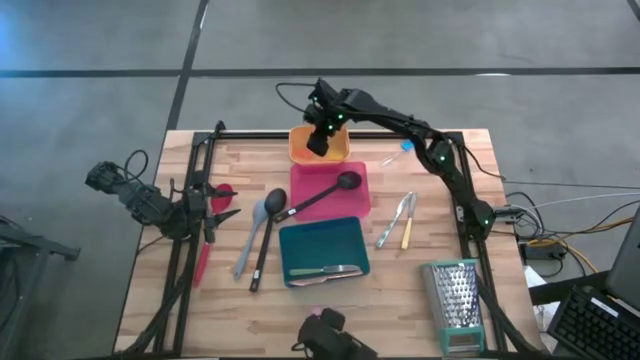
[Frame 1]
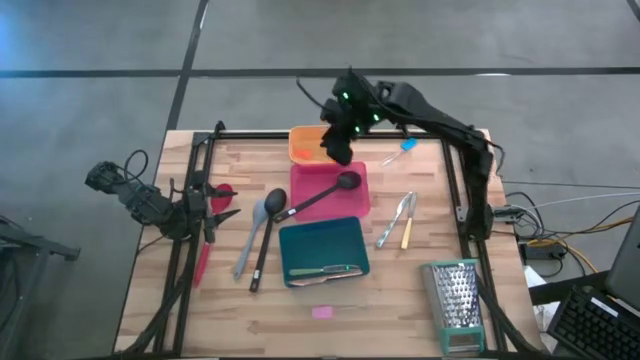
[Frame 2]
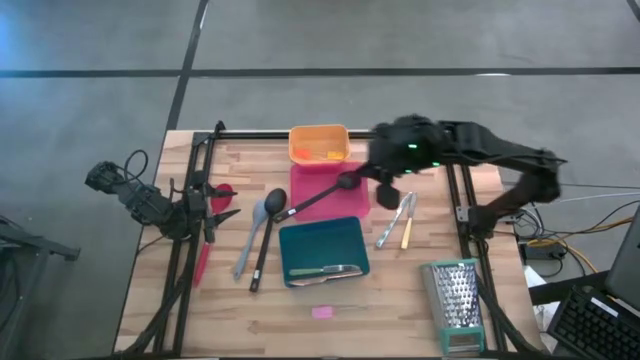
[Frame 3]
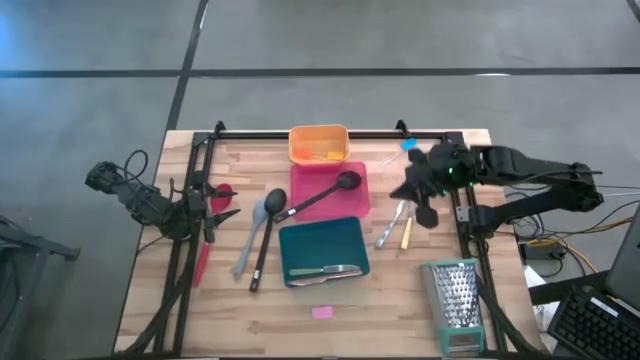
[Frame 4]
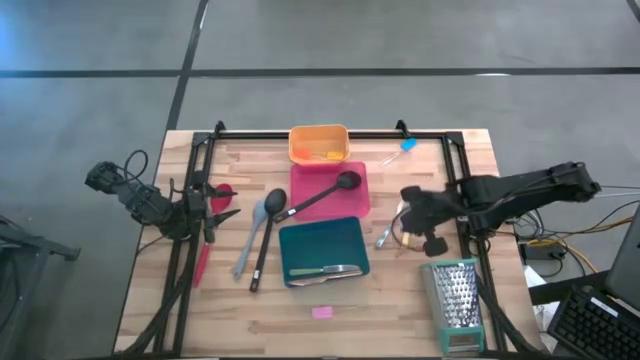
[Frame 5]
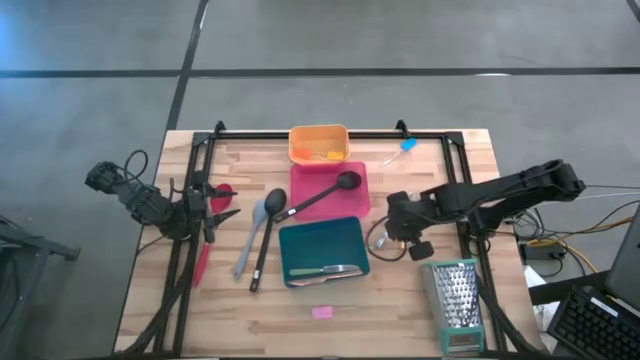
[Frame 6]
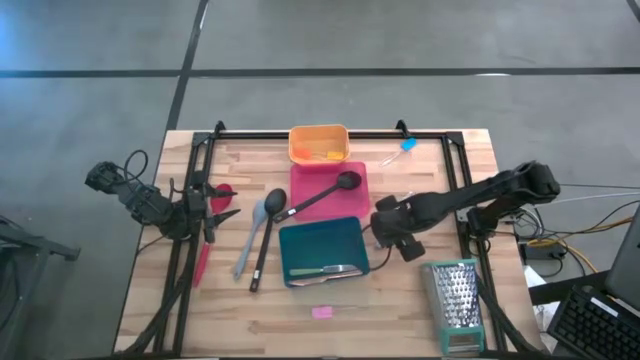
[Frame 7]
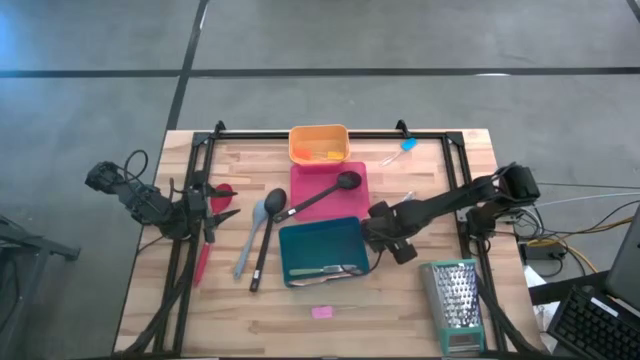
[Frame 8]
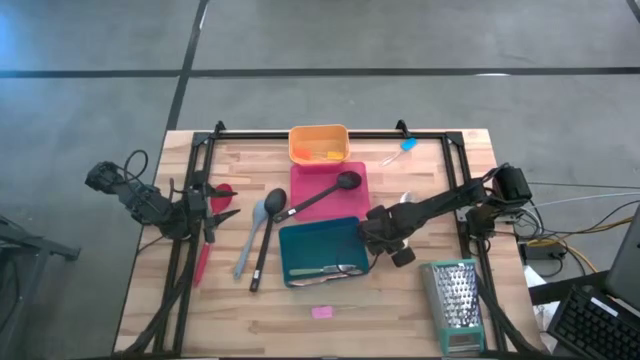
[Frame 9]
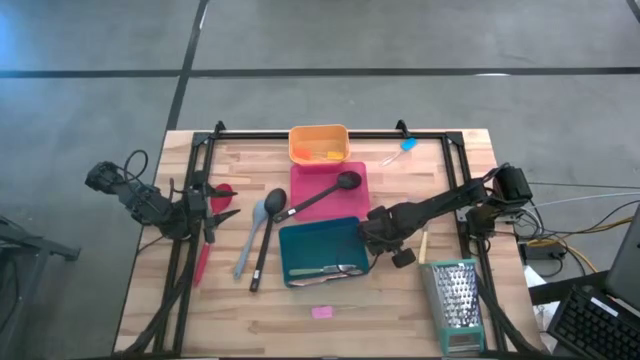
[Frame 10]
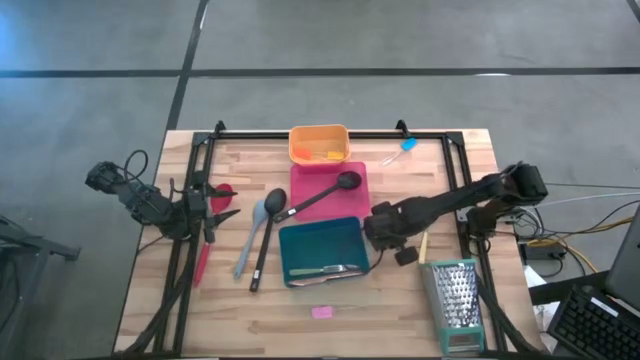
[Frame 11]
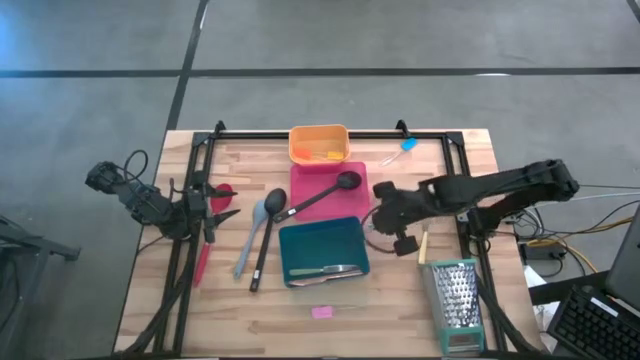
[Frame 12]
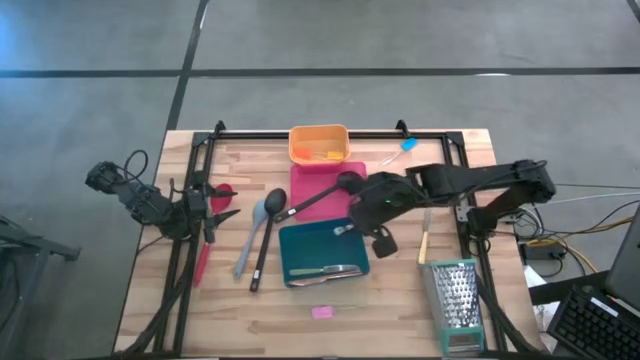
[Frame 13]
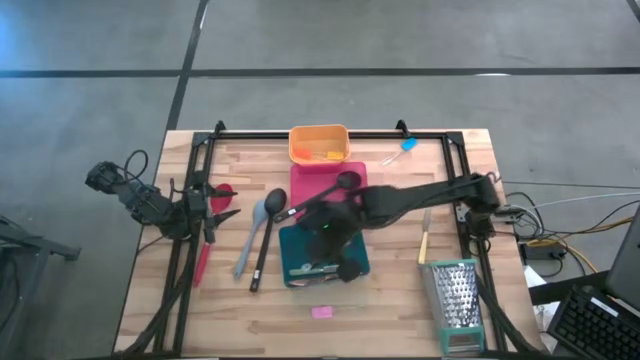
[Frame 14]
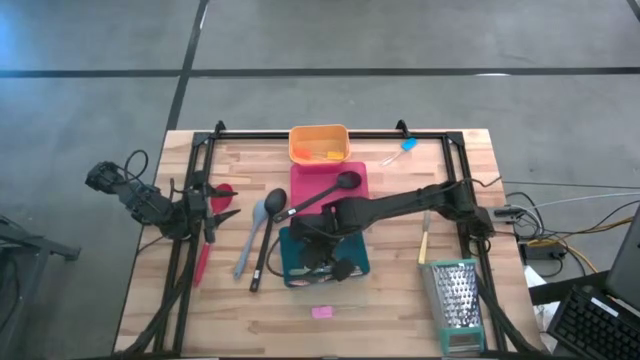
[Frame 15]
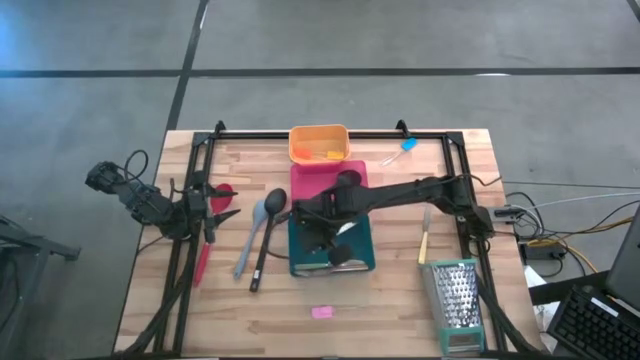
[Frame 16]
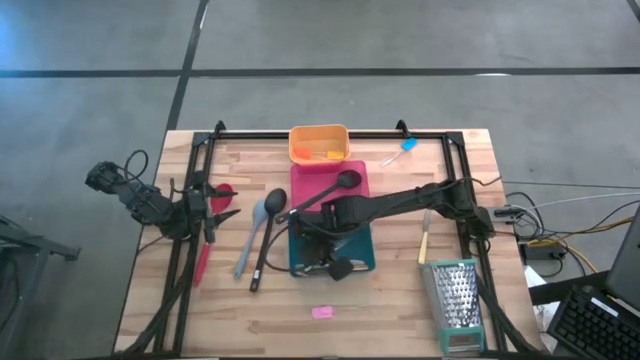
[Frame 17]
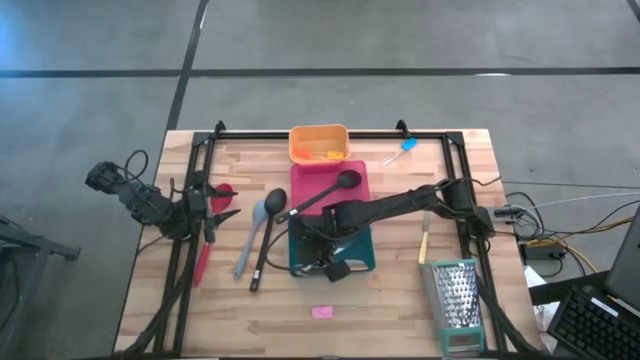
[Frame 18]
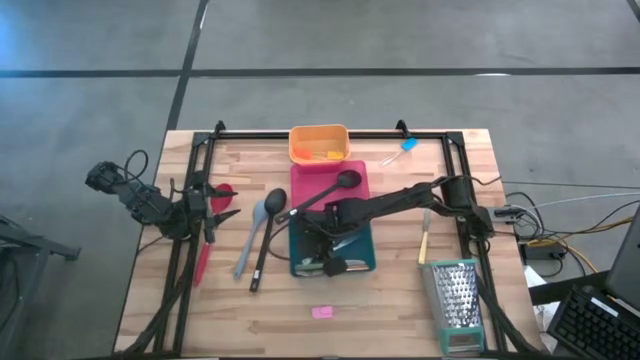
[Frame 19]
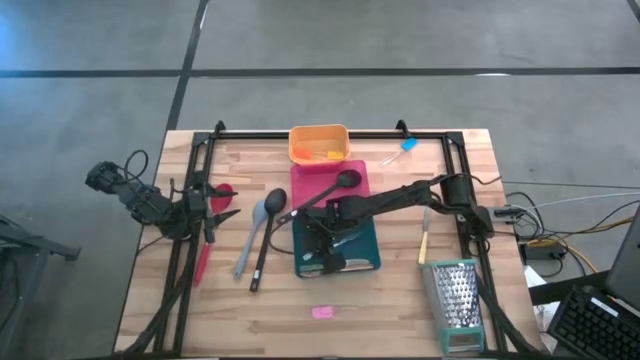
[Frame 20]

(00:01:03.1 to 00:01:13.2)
Task: Pick & Place Kitchen Items
Put the blue knife into the blue bin

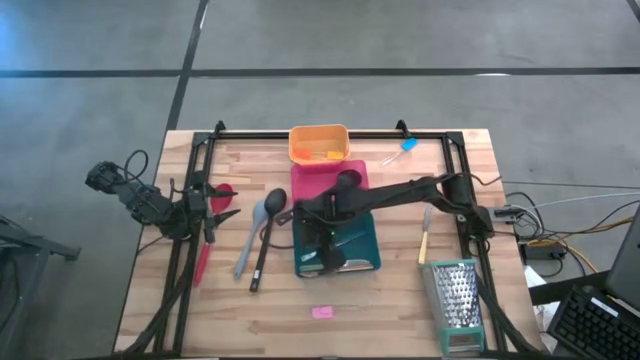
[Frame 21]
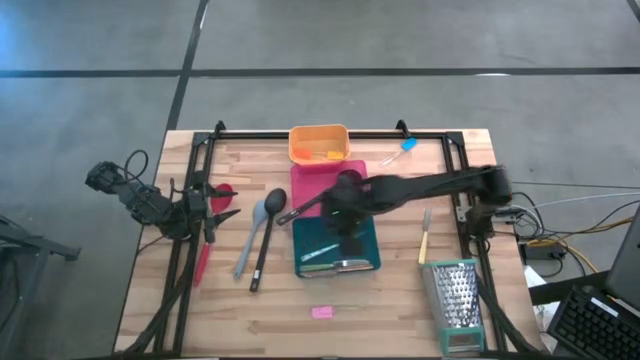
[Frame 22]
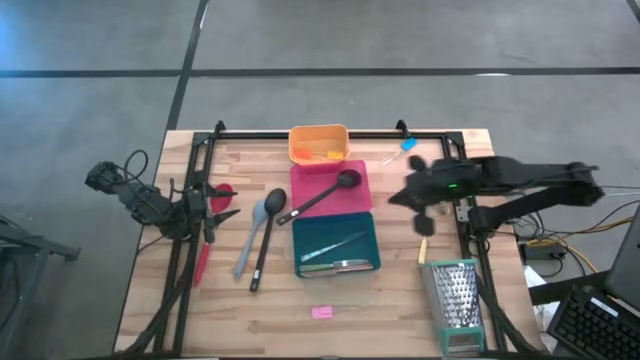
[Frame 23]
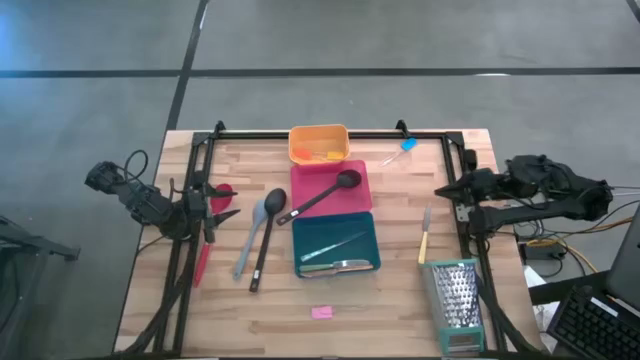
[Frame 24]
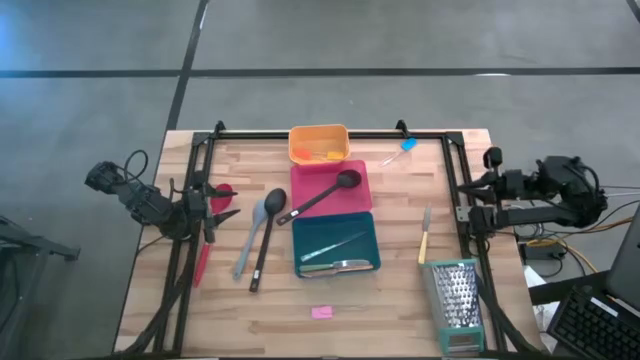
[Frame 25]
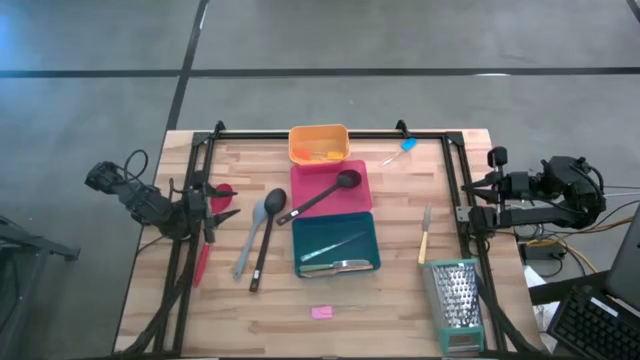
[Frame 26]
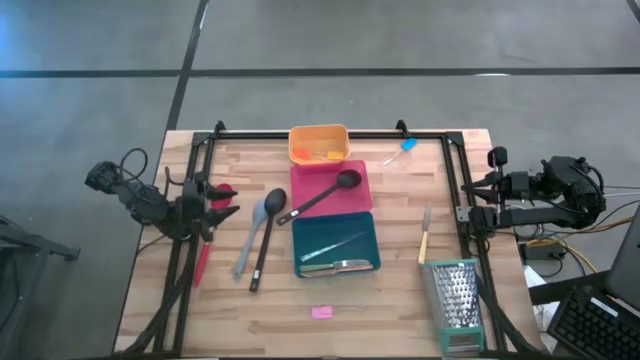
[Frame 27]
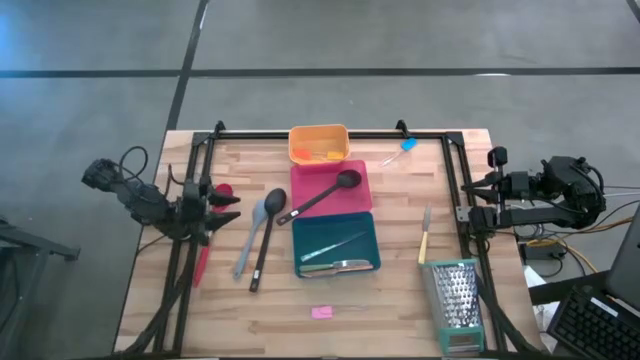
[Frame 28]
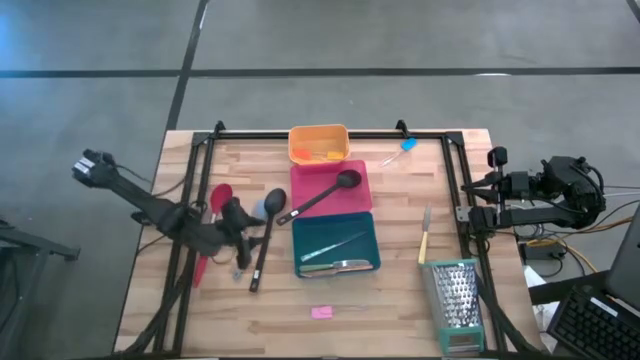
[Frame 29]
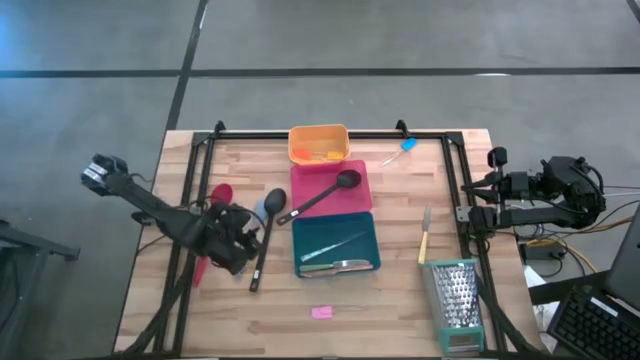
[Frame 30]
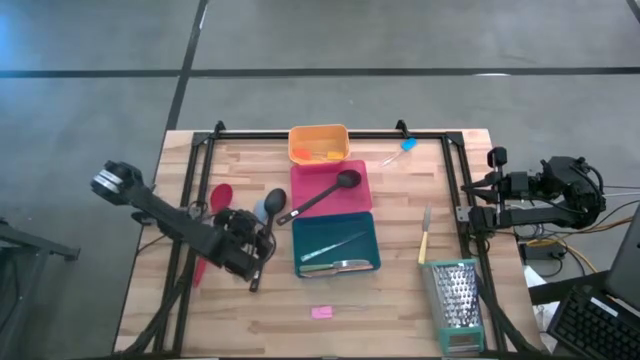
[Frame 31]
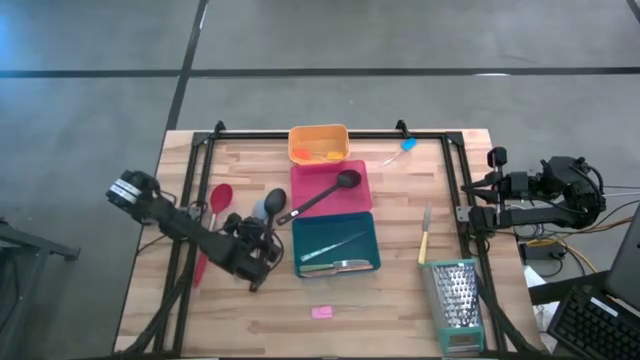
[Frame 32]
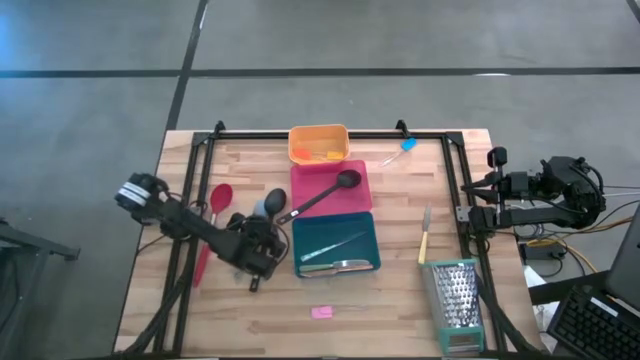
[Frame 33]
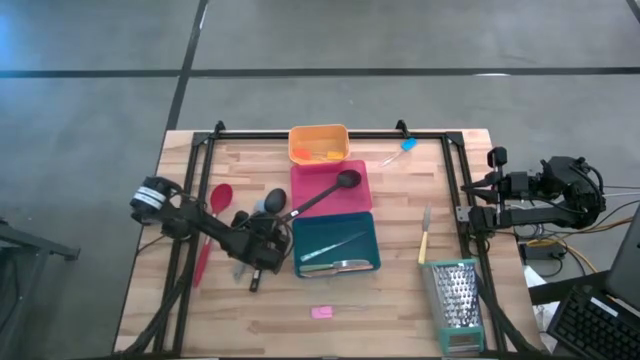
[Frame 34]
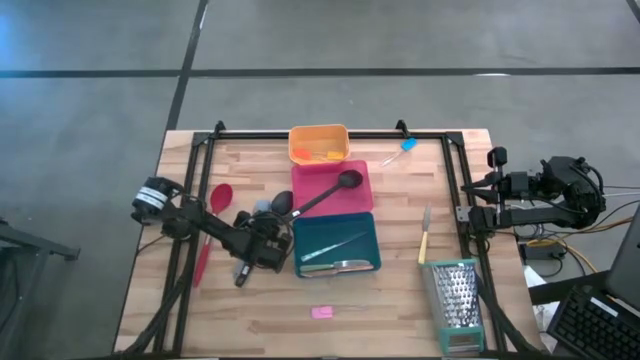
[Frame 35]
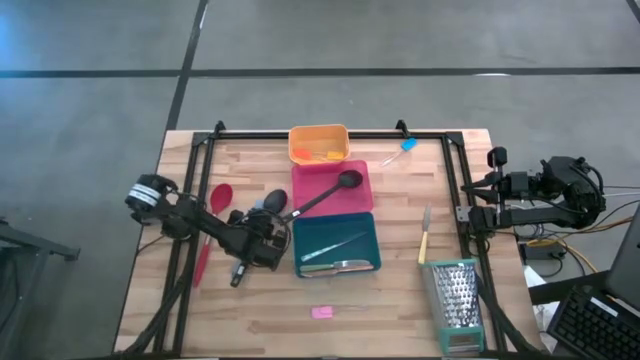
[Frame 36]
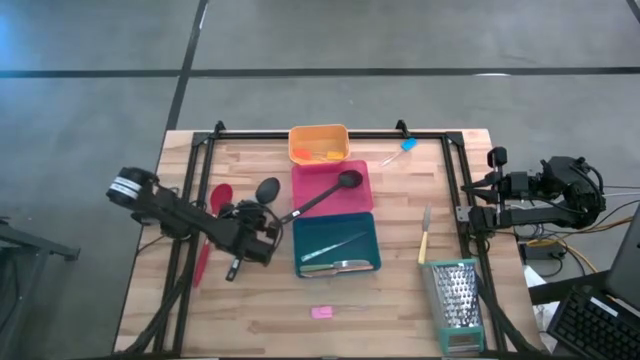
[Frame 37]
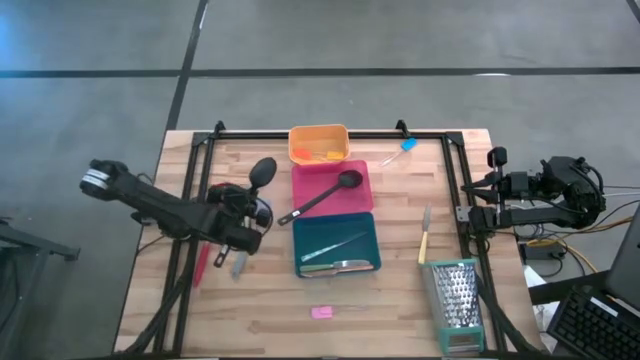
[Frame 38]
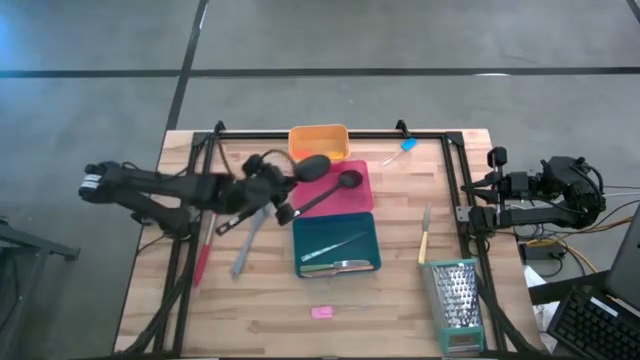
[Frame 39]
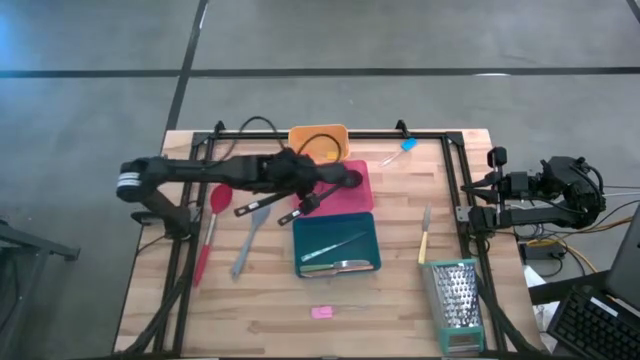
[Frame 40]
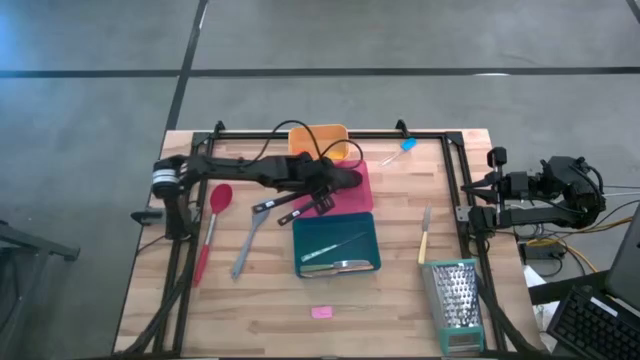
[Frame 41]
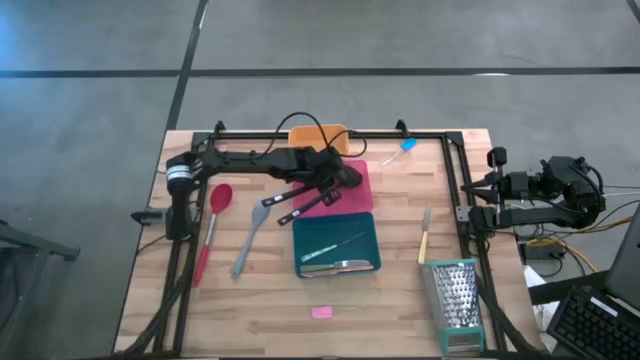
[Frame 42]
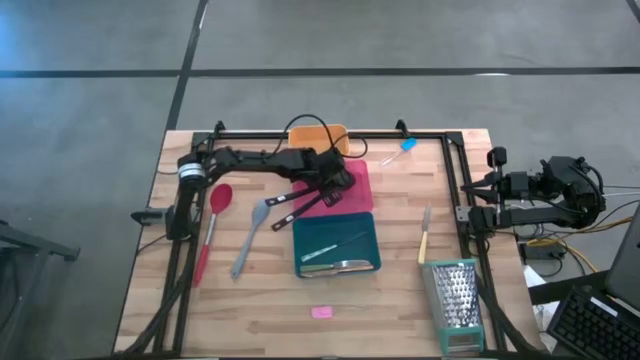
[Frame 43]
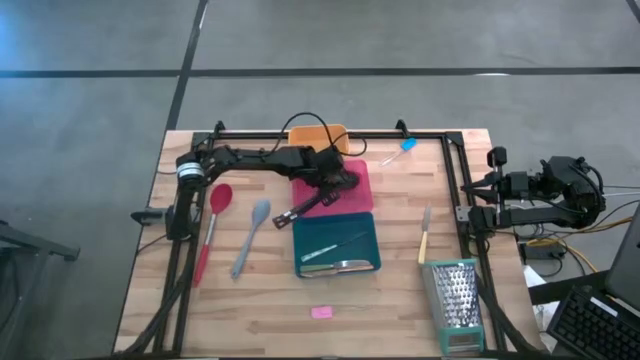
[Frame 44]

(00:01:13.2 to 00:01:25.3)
Put the black serving spoon into the pink bin

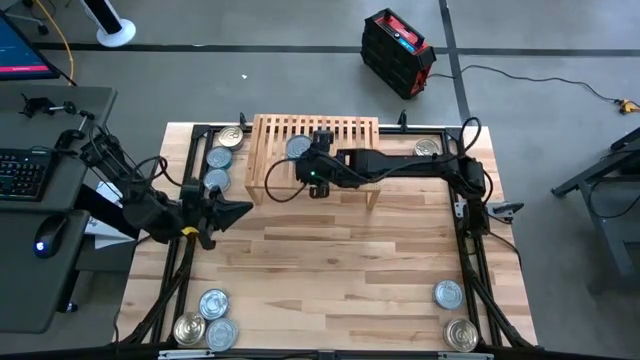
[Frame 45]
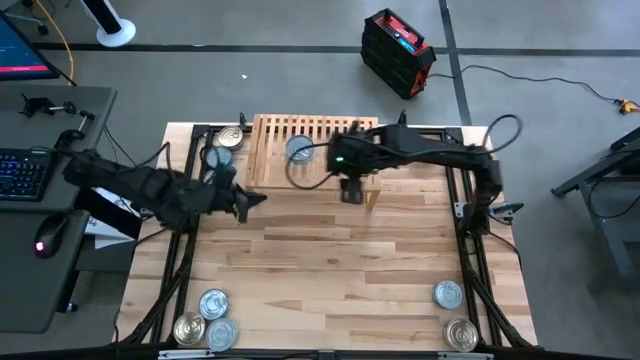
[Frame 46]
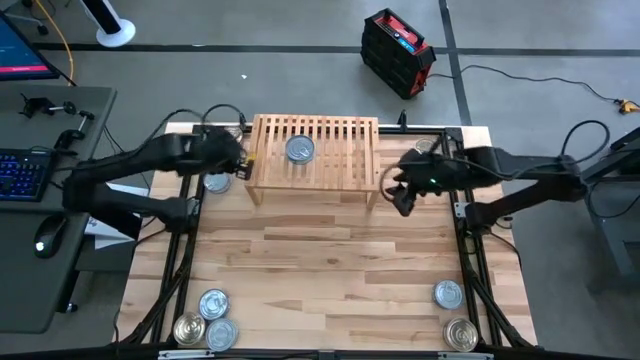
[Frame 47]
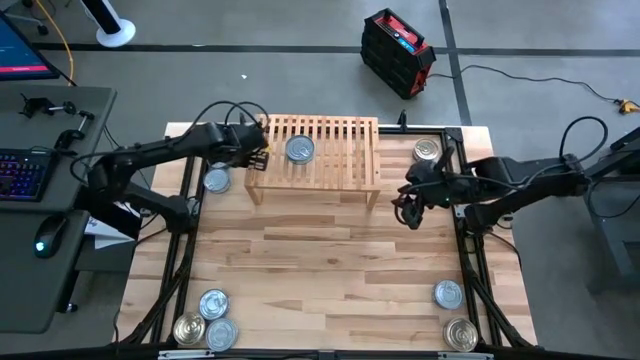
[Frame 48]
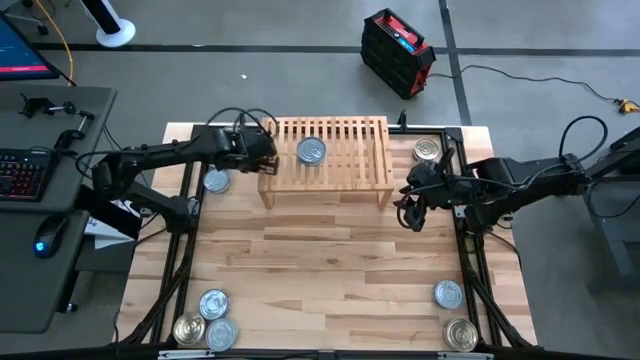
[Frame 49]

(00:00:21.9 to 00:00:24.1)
Task: Stack canned seafood by type on shelf
Adjust the shelf
